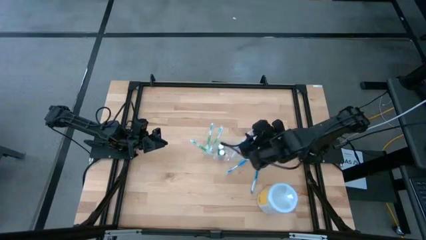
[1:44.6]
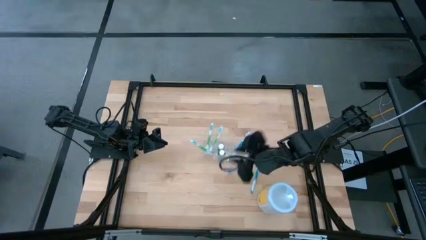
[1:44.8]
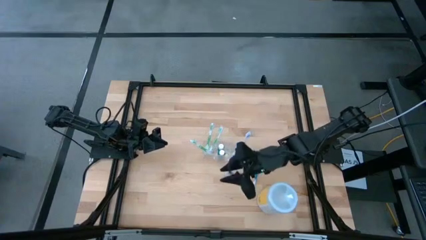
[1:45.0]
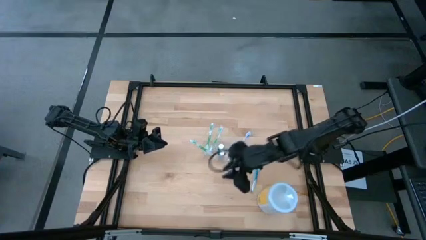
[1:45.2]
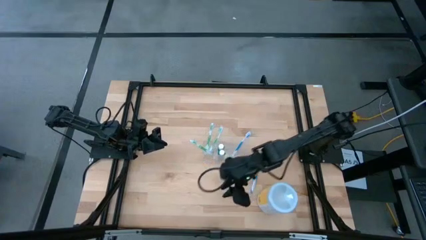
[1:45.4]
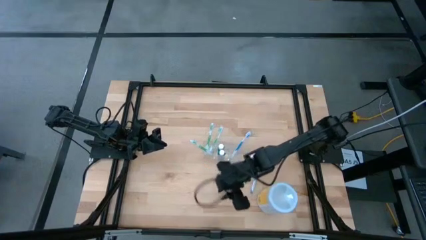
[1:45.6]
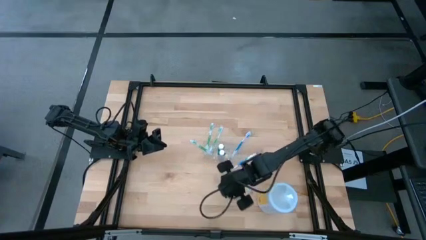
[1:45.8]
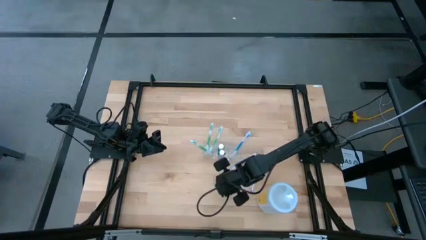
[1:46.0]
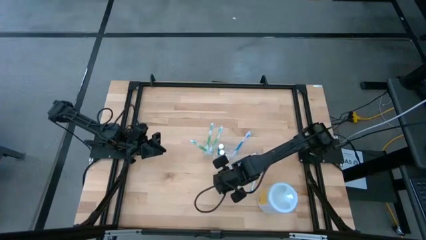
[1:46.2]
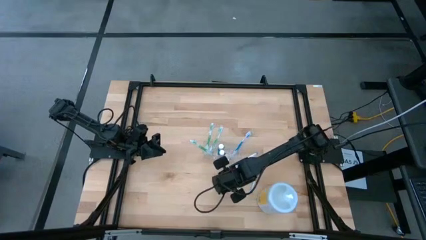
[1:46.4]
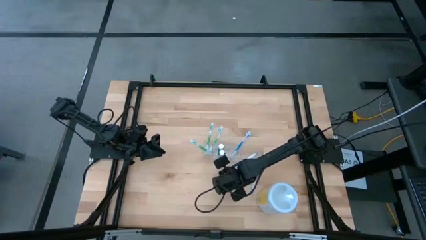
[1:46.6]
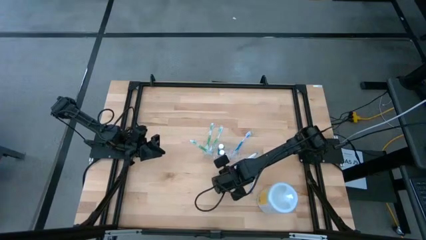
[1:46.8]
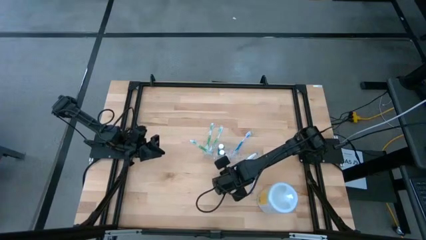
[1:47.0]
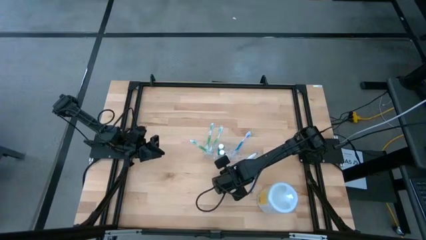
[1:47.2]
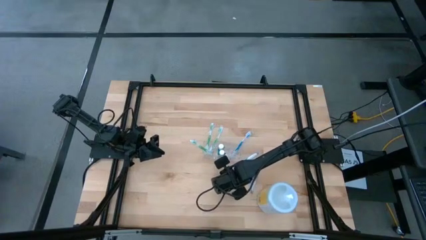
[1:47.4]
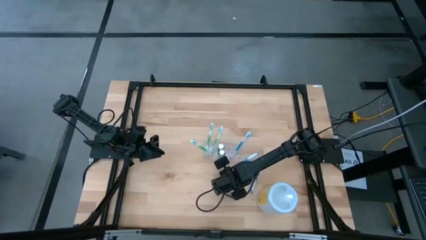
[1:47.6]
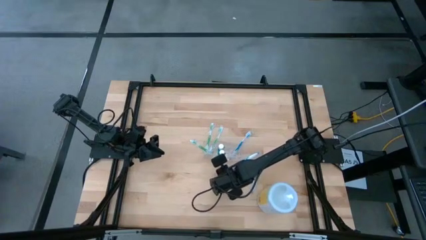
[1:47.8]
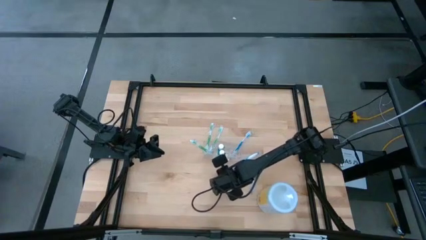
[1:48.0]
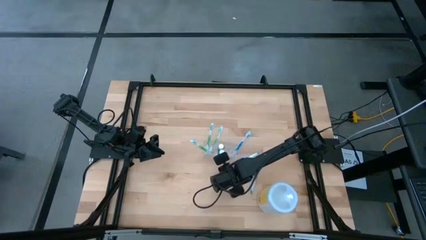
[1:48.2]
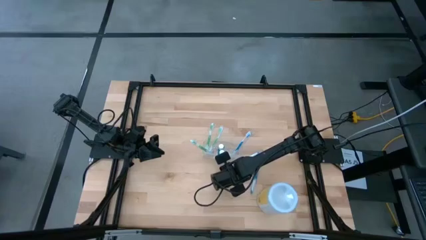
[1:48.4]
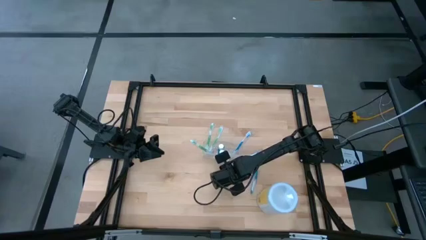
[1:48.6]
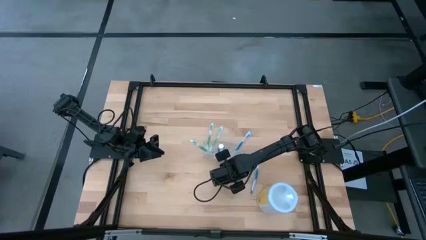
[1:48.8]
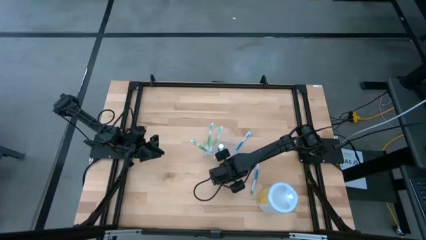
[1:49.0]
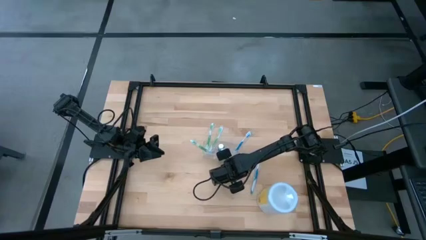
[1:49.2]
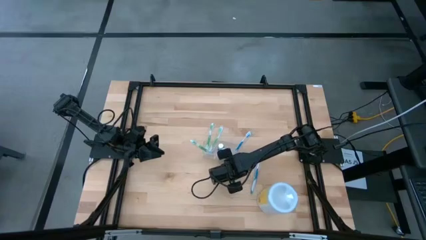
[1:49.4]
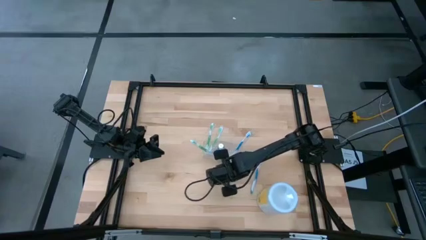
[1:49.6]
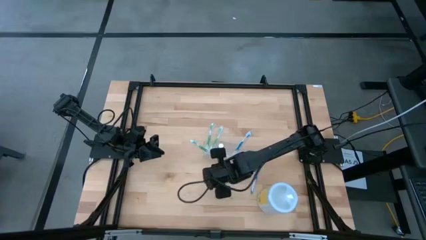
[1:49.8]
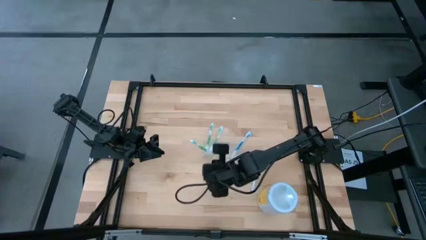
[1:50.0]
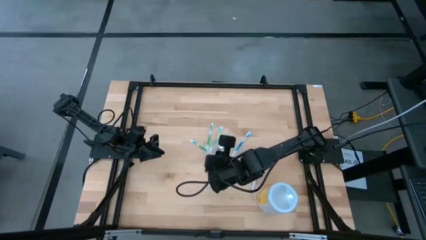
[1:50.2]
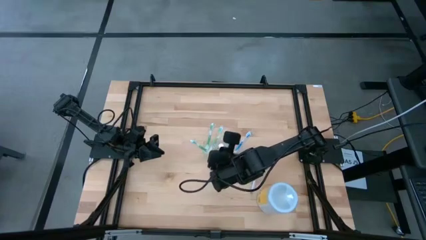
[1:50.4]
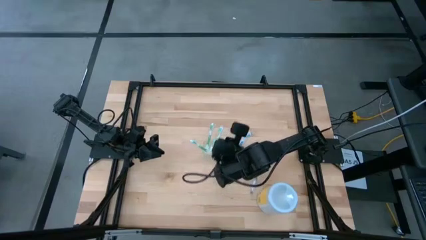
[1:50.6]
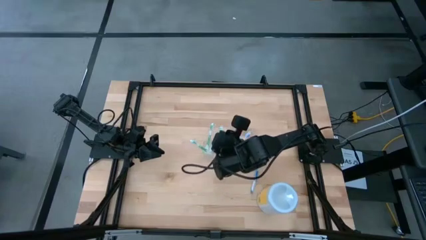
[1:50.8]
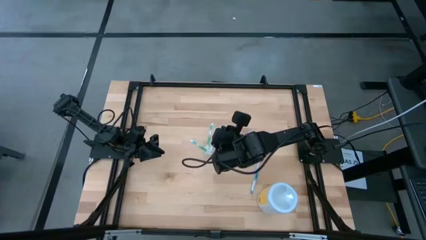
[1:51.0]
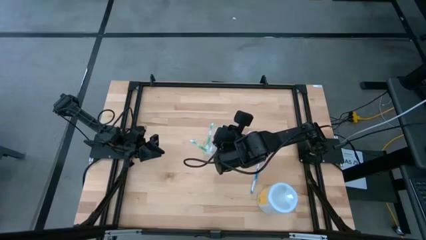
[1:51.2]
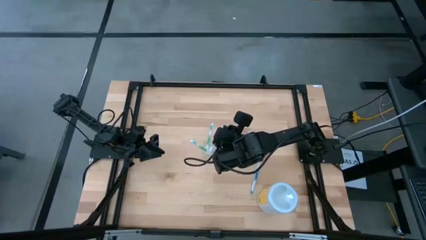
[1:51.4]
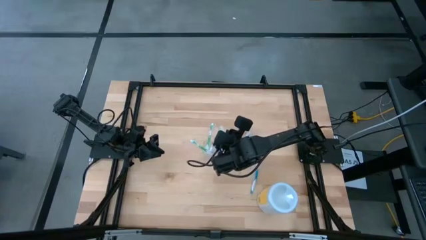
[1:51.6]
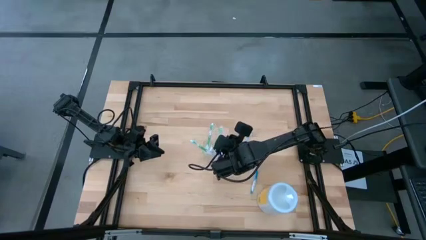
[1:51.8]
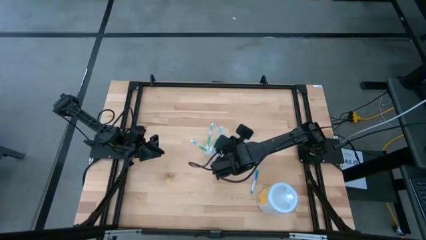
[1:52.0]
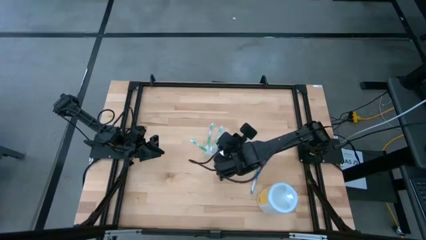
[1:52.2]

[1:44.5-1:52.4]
Task: Pick & Place toothbrushing station
Put the left blue toothbrush into the transparent organizer

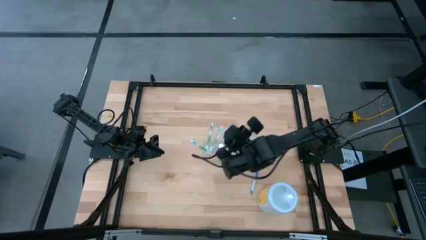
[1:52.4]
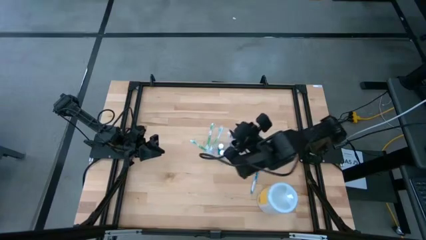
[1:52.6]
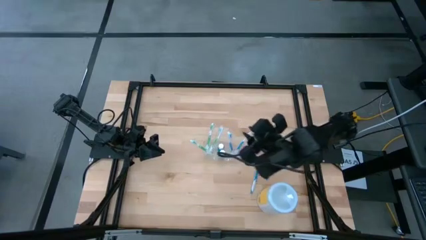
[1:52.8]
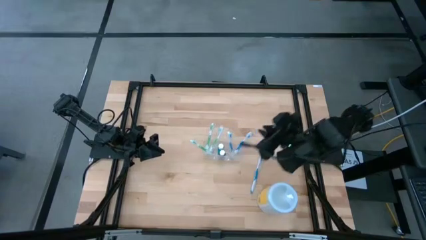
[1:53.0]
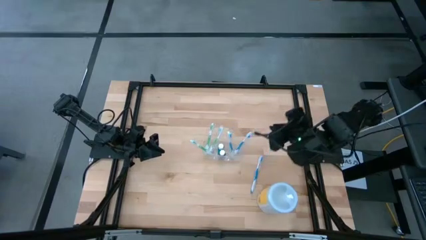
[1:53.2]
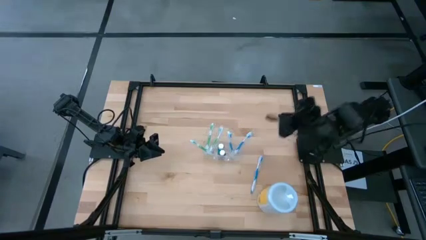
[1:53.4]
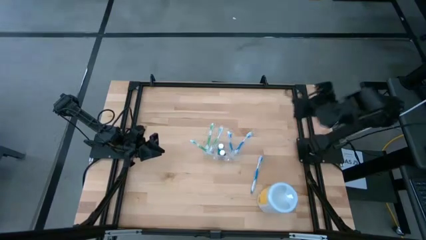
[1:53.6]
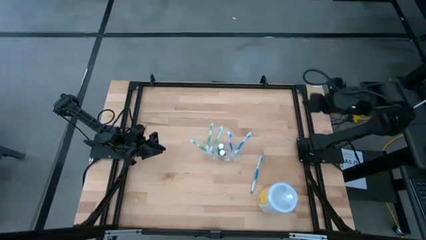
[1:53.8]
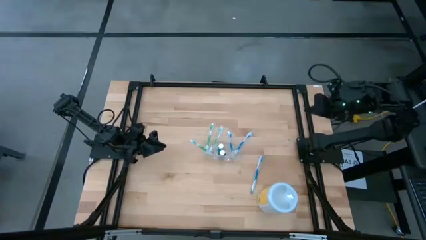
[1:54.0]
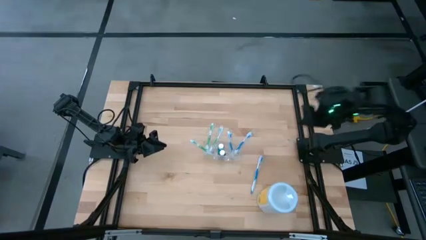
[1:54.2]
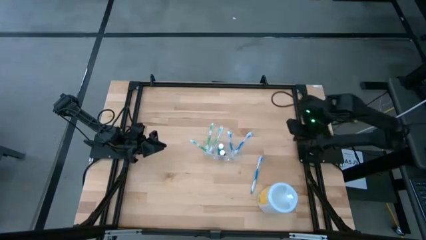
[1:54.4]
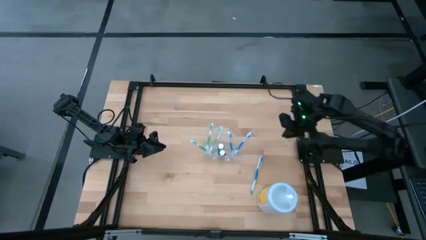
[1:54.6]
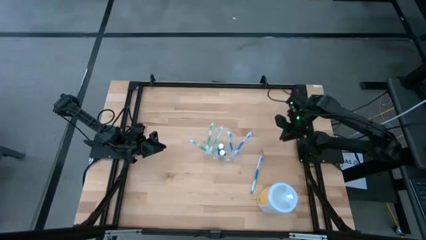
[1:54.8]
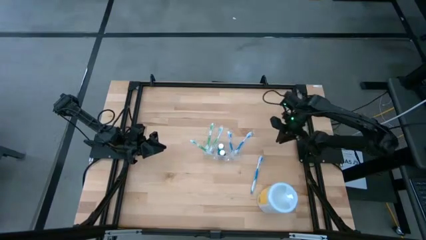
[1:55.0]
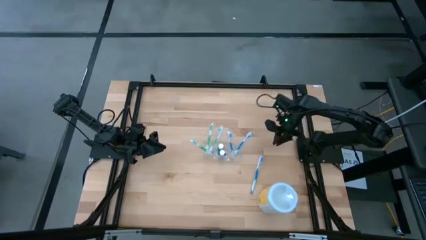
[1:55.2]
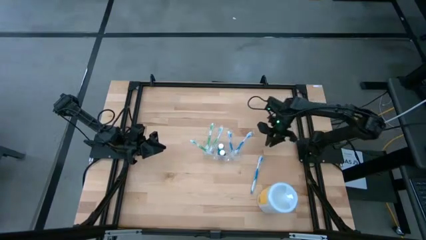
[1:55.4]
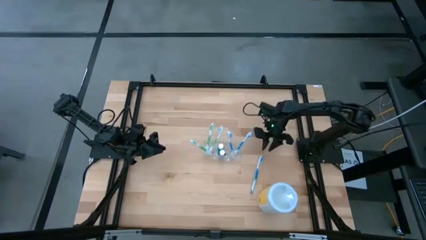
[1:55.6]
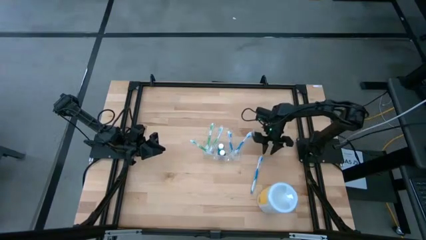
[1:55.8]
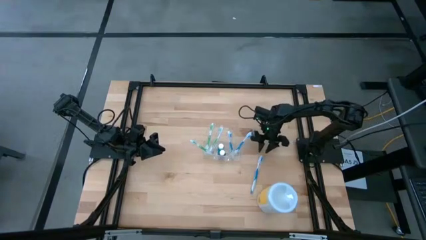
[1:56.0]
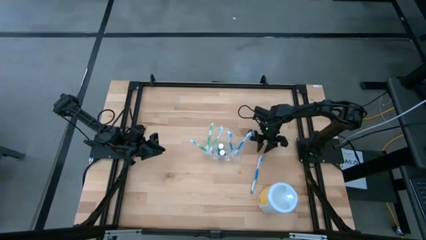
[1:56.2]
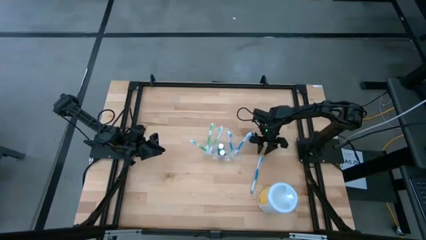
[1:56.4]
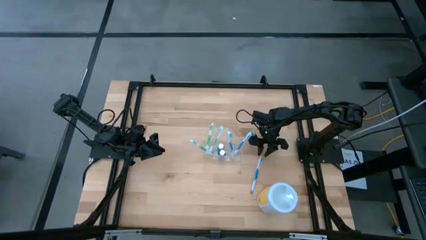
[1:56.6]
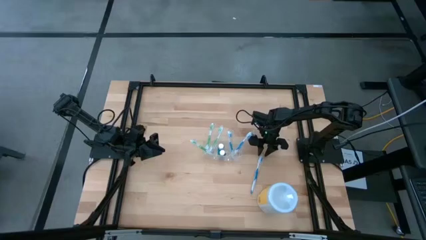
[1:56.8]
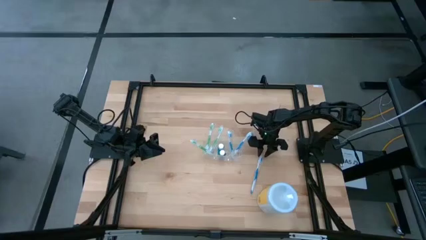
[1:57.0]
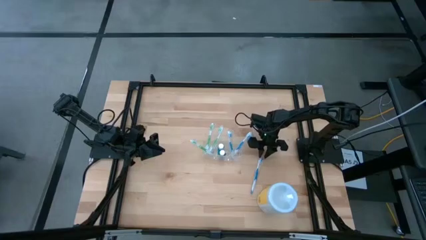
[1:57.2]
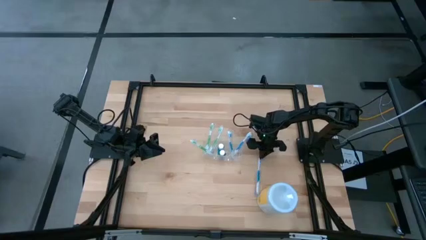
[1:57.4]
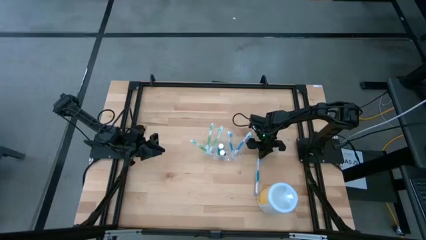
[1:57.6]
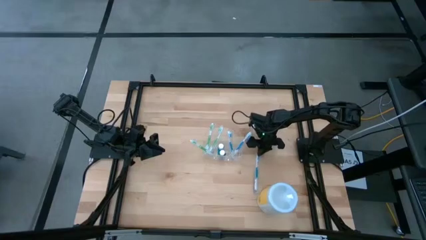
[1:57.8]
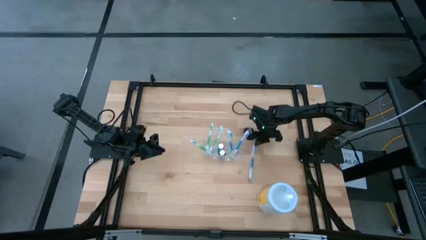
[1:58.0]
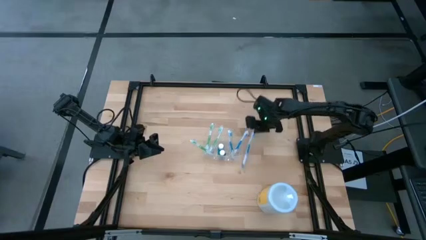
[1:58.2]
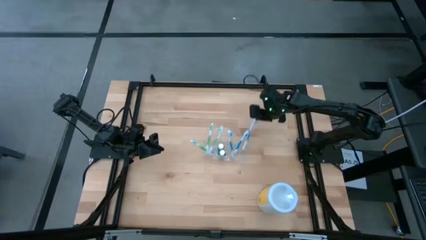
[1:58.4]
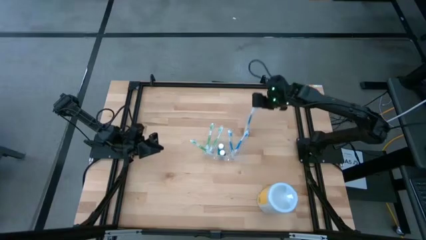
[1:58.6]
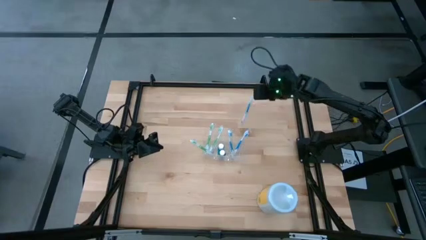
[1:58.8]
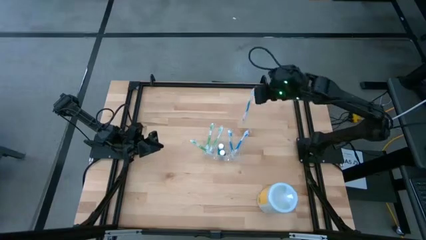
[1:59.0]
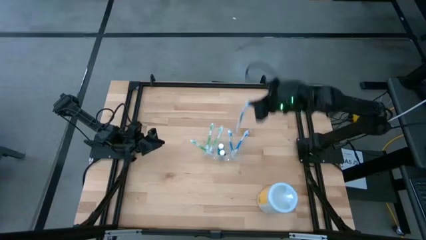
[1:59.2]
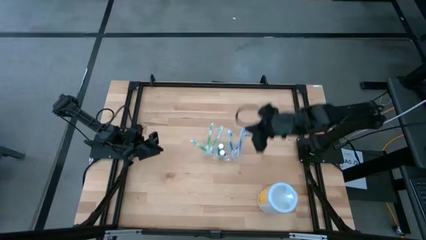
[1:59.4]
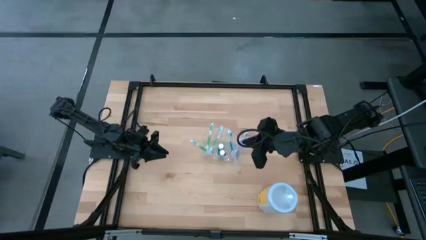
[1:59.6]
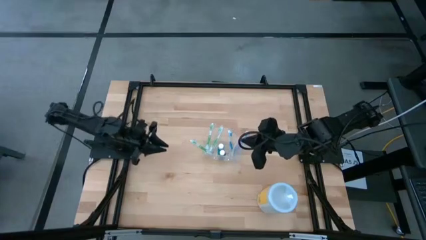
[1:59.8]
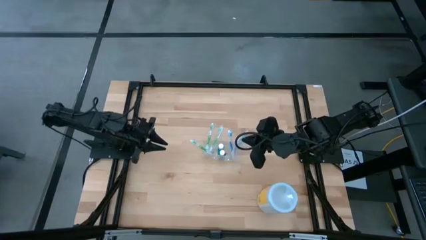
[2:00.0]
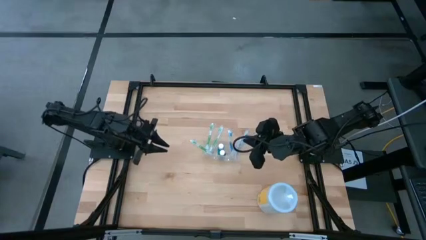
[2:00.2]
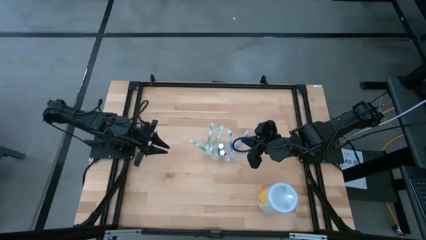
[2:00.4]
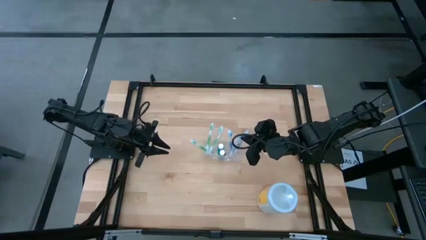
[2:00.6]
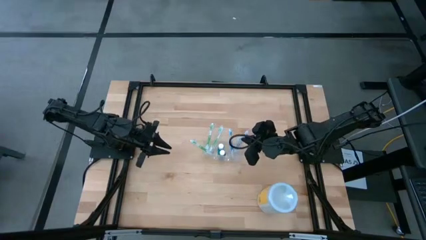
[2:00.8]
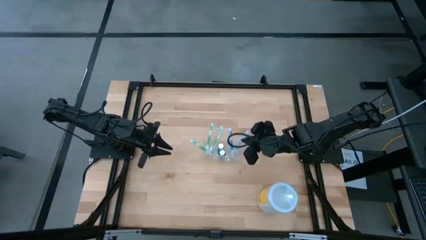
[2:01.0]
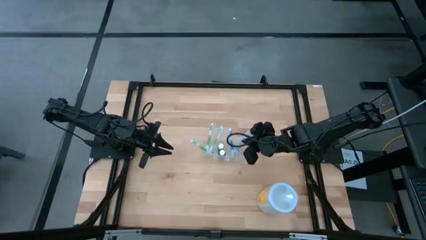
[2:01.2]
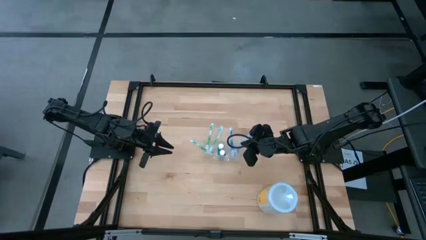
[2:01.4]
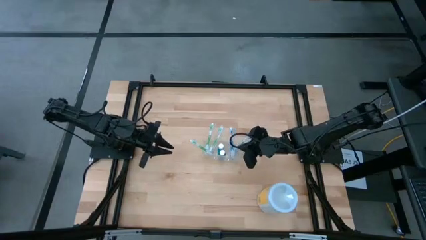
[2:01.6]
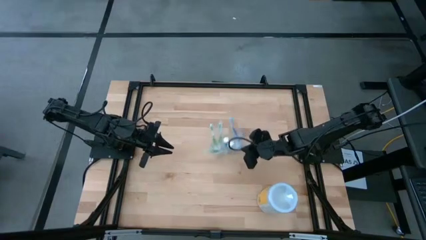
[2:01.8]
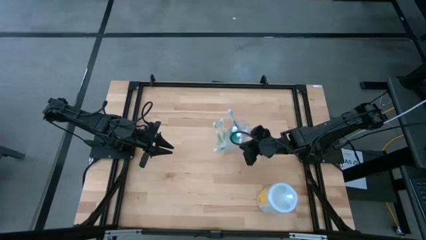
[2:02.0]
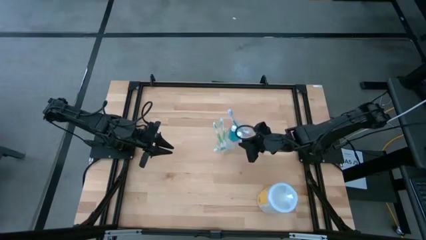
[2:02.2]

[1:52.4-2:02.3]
Put the blue toothbrush into the transparent organizer
